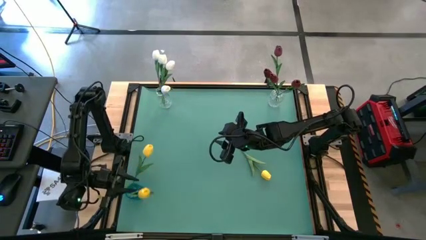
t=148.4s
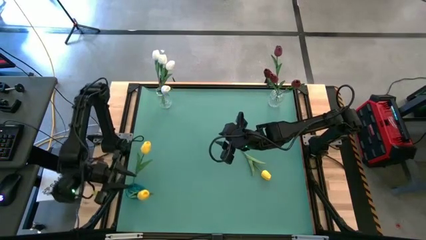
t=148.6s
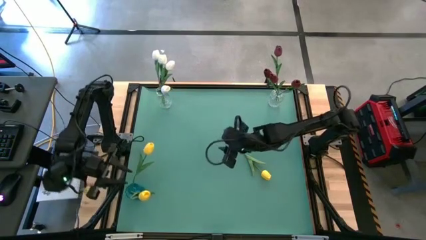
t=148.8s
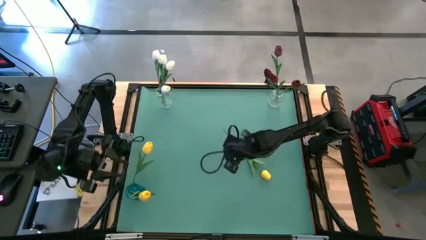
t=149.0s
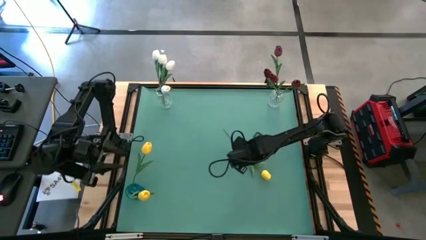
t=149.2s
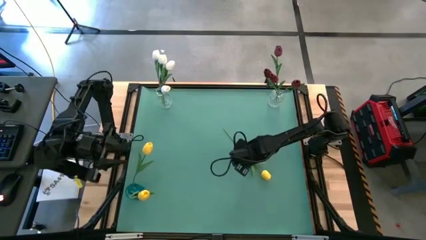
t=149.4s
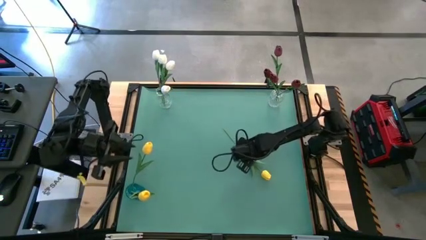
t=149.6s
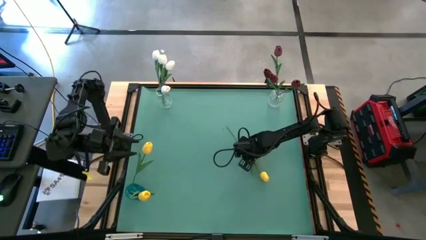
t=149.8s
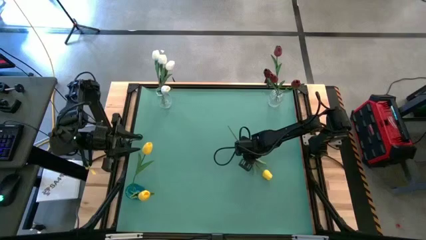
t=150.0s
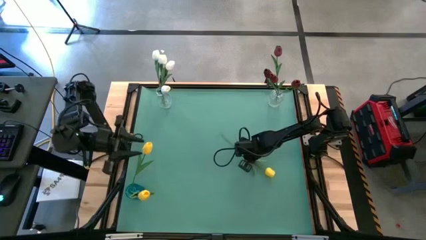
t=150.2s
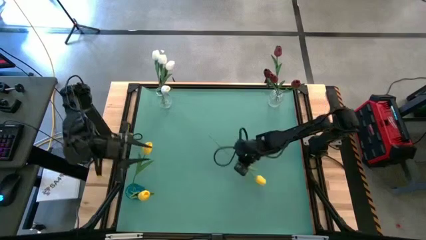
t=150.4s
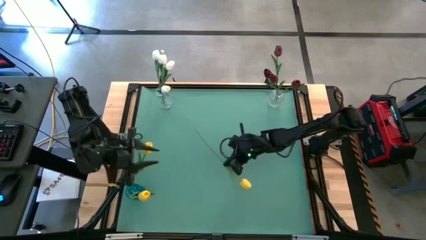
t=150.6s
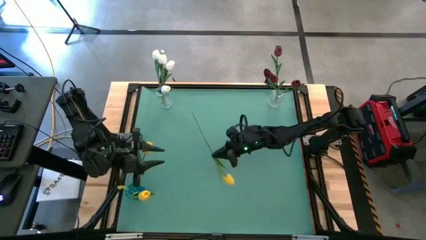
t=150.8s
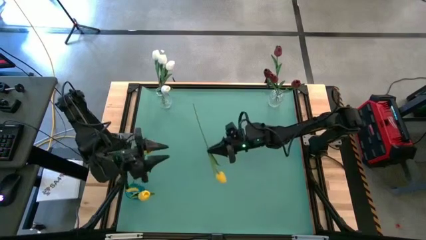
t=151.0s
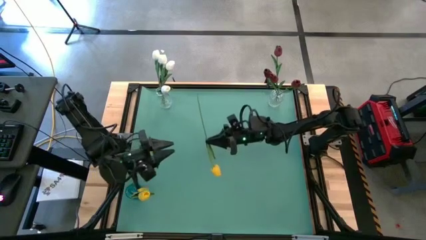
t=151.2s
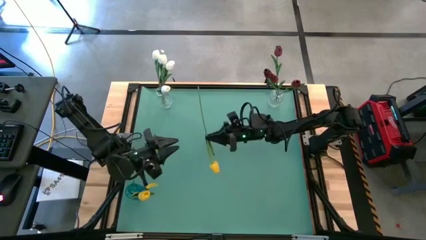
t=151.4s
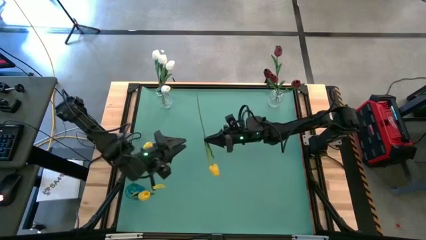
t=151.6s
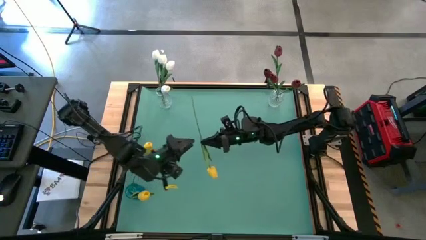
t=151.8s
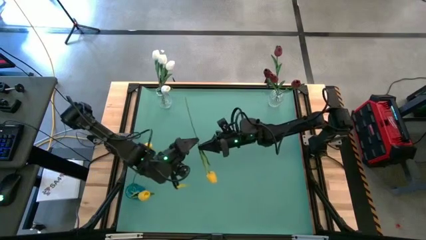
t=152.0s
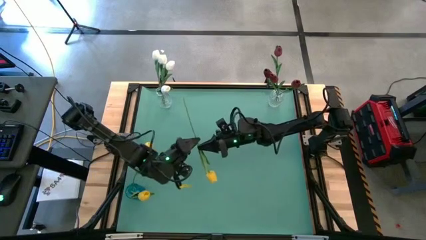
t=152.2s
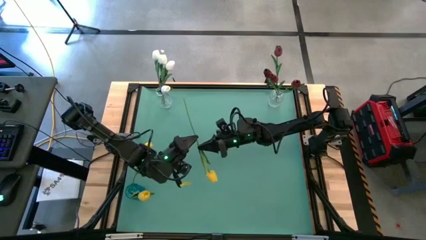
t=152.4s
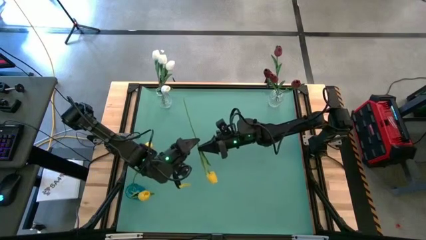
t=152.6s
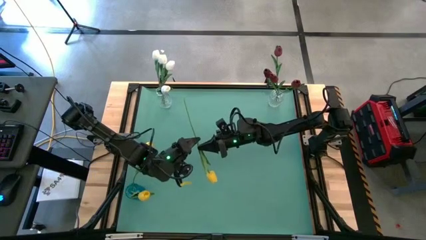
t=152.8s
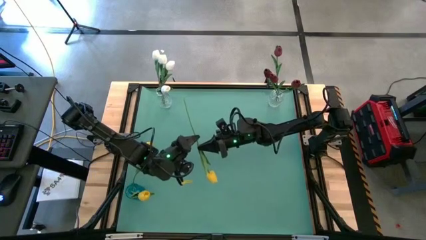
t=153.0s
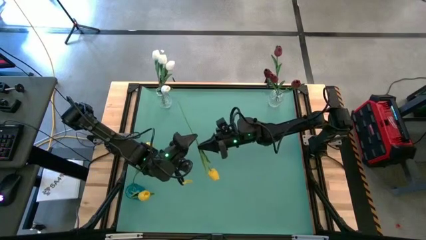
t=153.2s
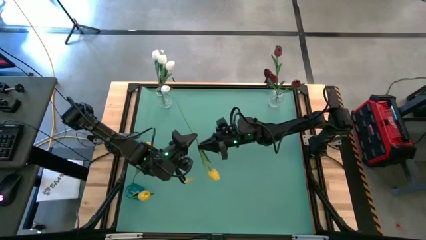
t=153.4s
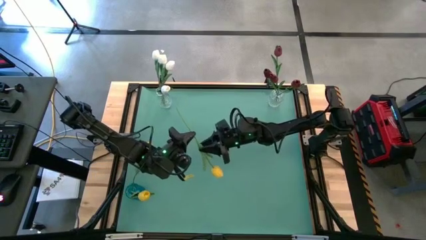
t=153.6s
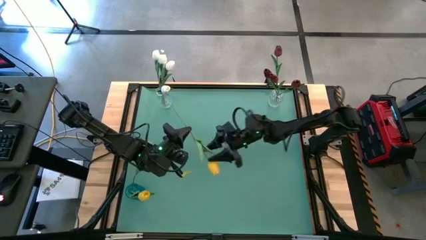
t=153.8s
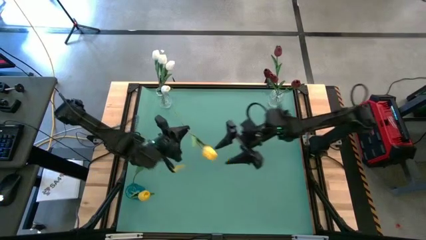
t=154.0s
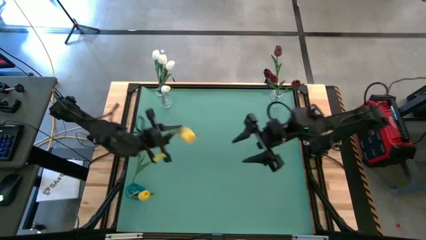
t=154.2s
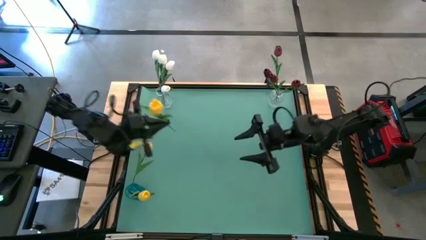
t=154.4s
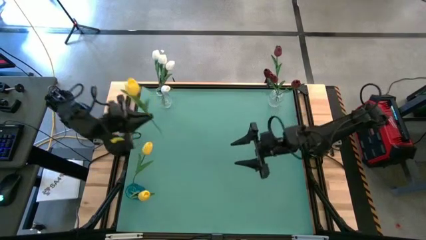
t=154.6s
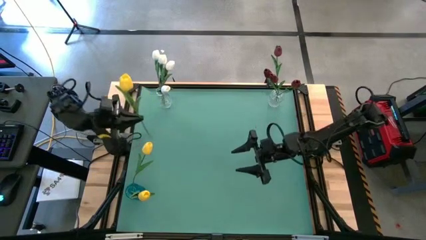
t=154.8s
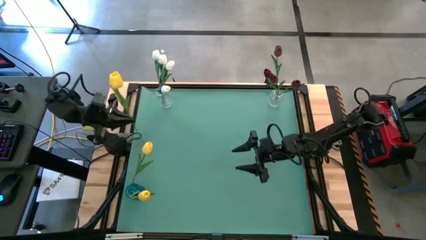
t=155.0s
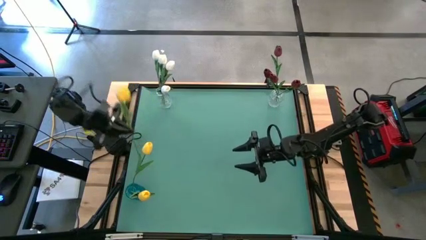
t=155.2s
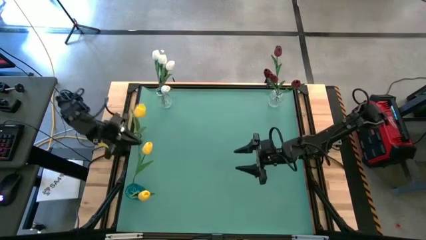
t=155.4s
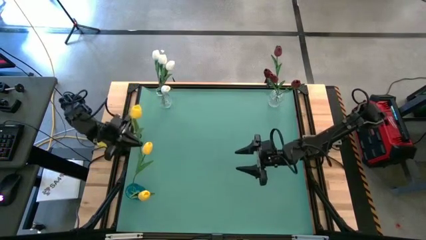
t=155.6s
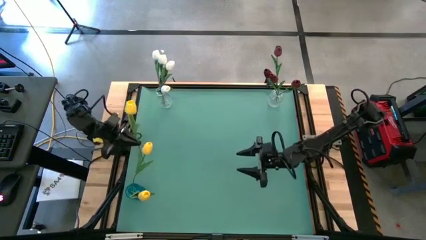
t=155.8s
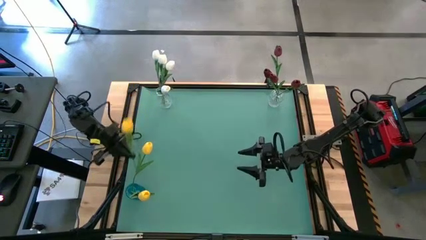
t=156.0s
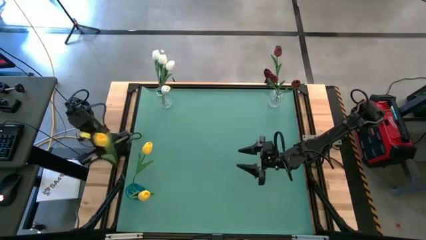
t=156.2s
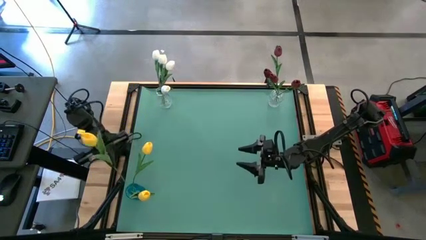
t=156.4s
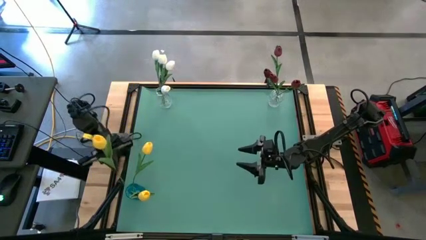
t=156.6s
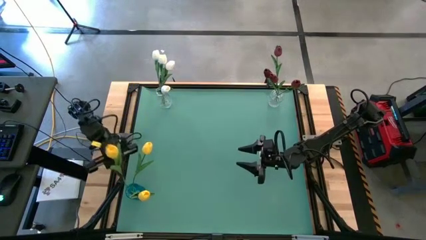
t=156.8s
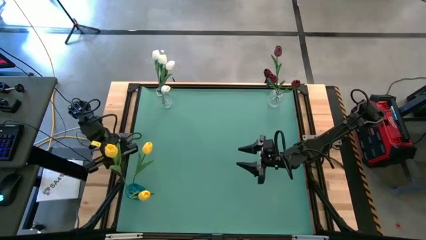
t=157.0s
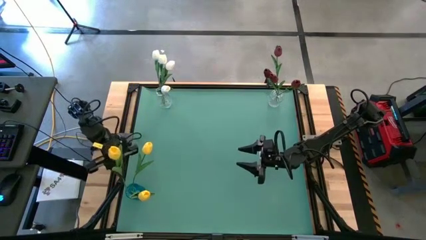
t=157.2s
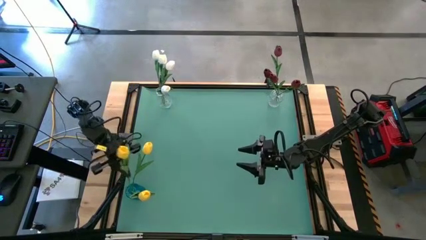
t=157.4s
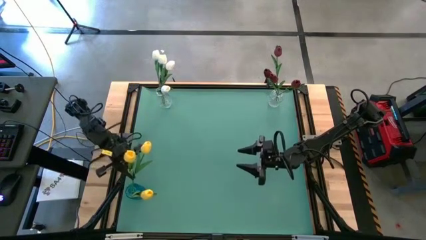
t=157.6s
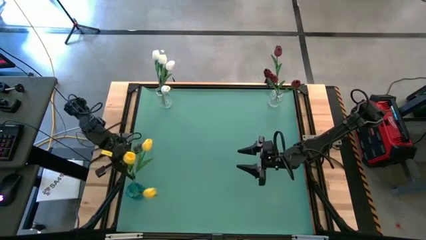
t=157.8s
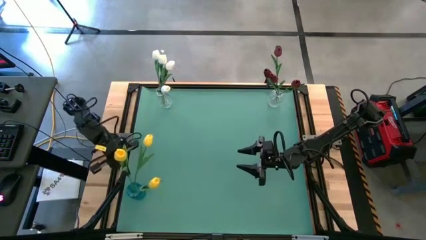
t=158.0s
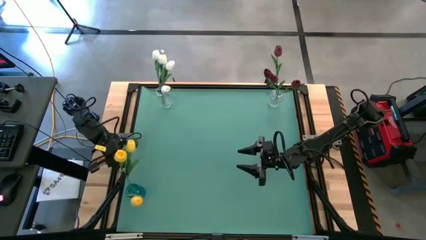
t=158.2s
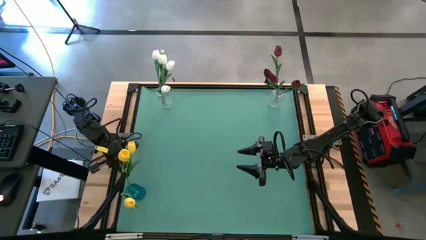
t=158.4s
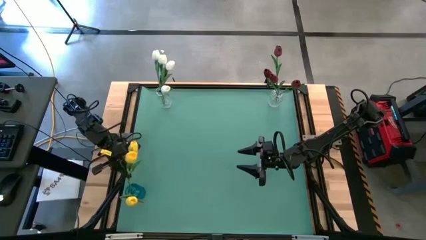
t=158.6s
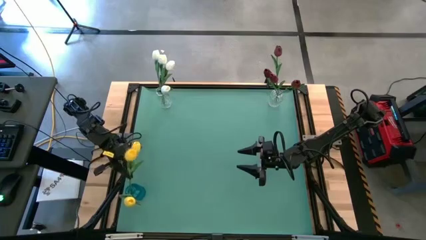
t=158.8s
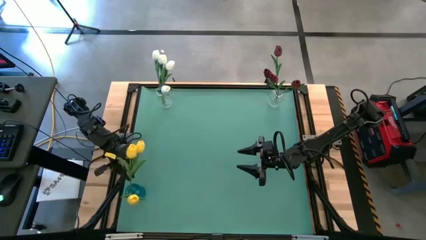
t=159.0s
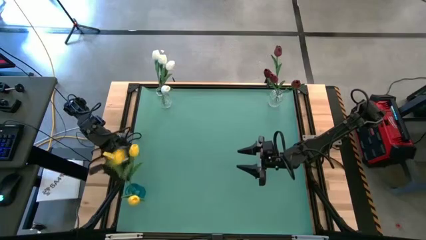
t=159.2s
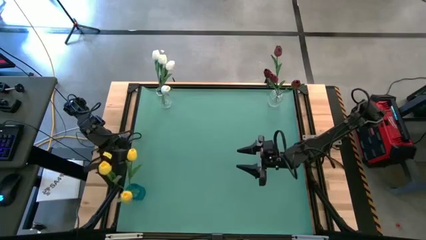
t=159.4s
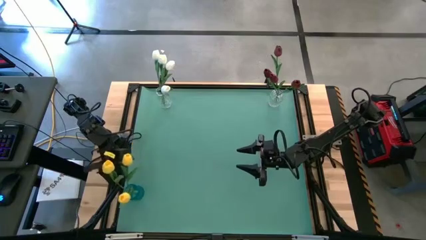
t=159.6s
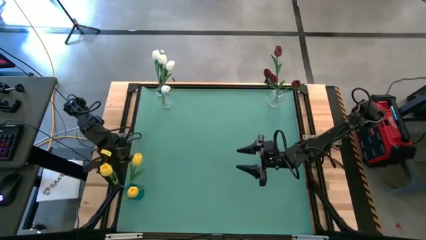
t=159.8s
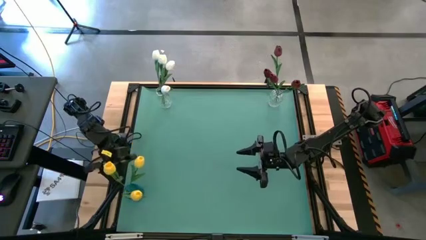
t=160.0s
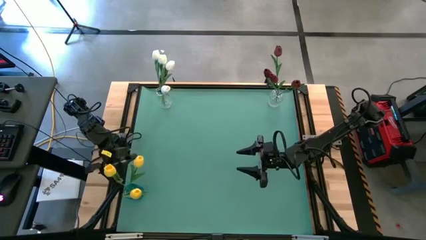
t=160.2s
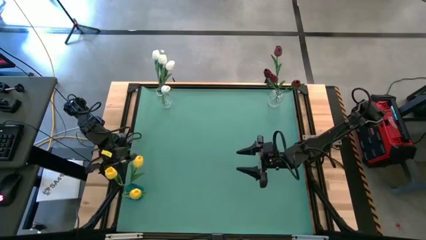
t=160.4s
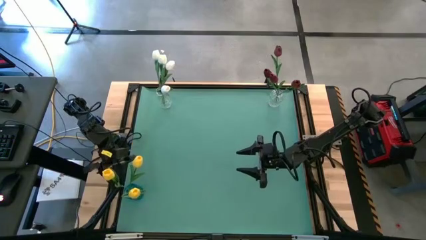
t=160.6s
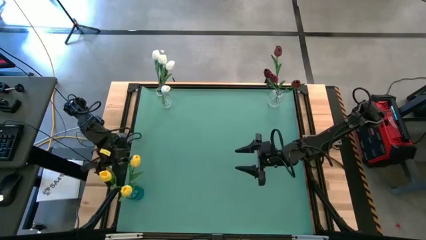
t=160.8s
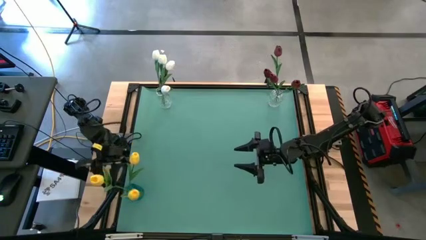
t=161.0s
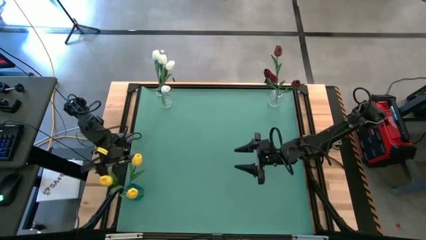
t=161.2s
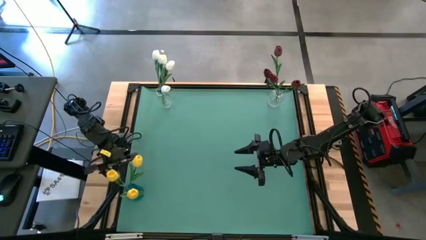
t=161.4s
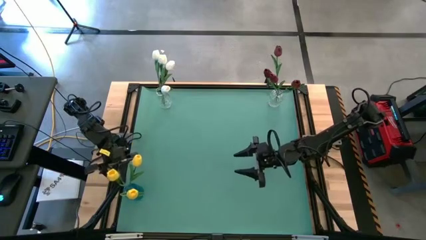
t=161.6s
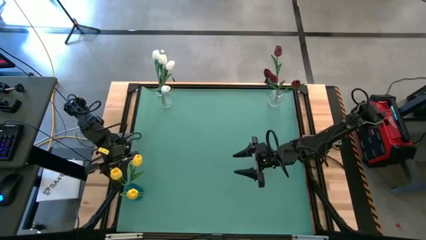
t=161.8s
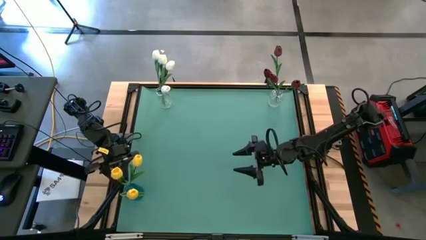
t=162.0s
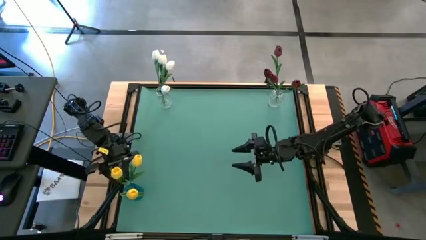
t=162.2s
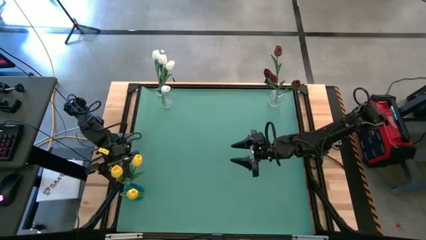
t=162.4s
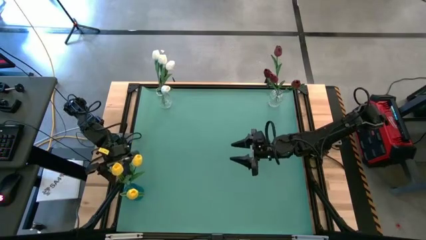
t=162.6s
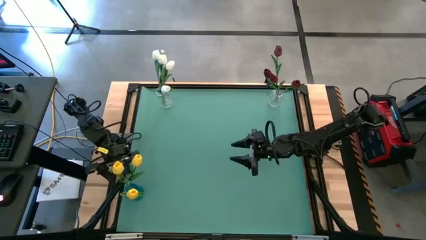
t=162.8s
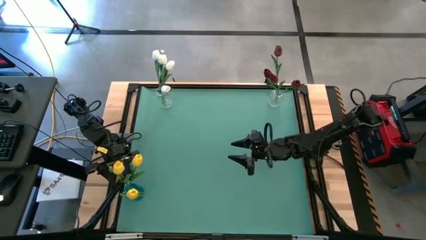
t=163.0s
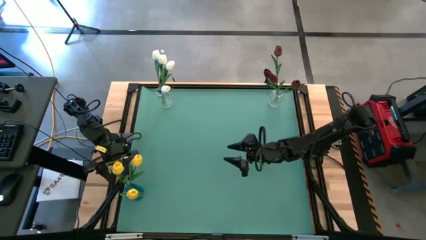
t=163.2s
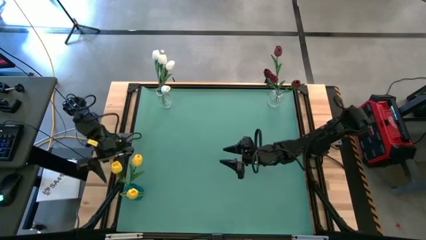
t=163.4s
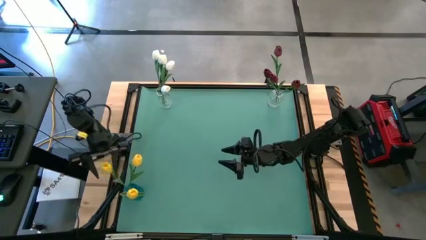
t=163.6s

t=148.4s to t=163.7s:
Task: Sort flowers into vase by color
Put the yellow flower into the blue vase

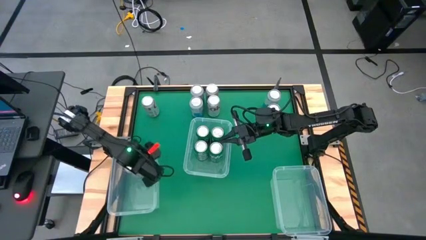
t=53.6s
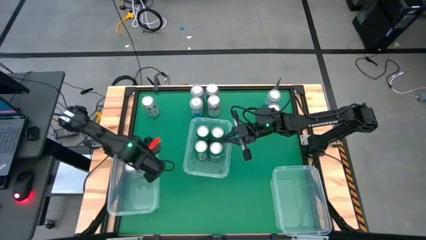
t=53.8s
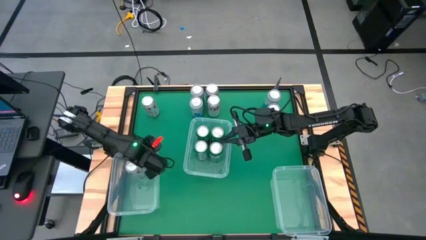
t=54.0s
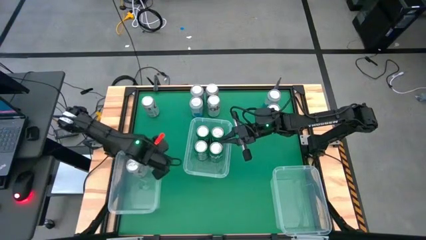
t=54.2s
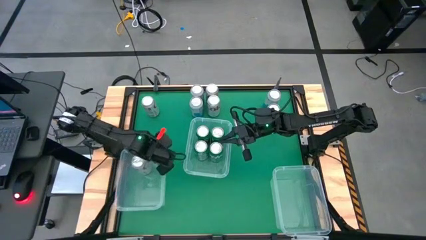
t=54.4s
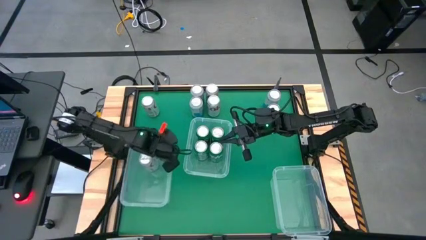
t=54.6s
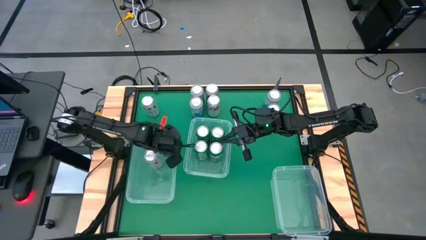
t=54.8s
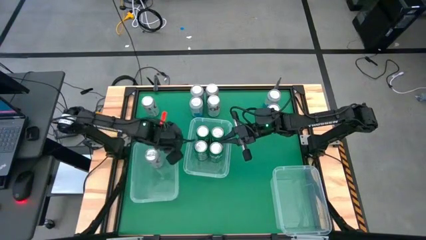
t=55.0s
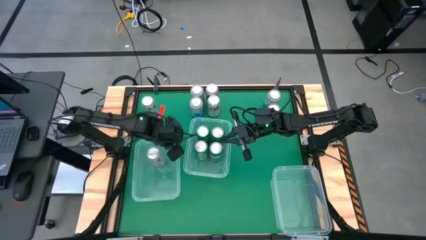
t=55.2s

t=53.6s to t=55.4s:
Task: Sort soda cans
Adjust the bottom left bin on the table
